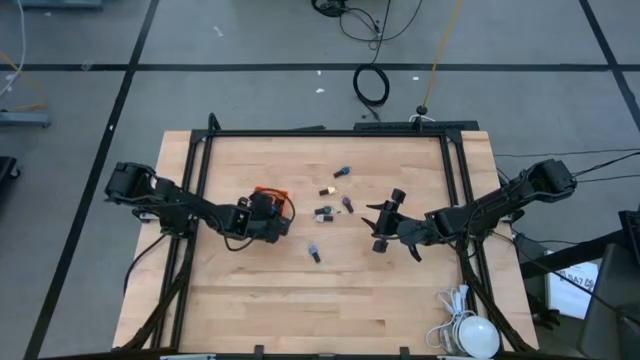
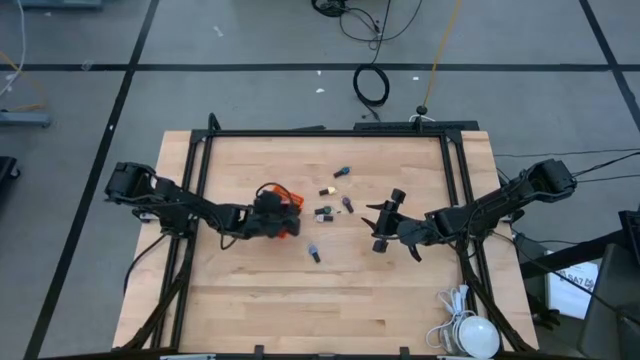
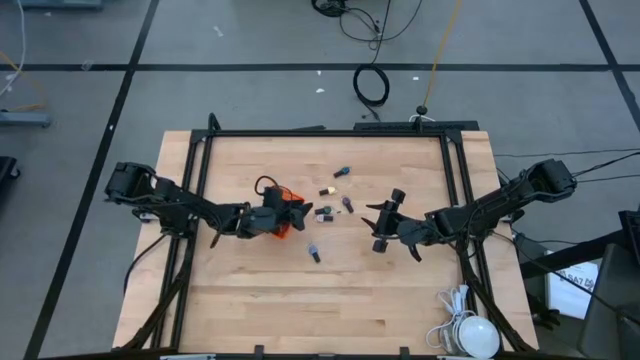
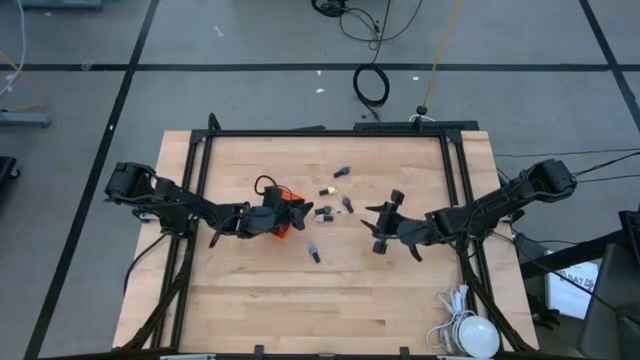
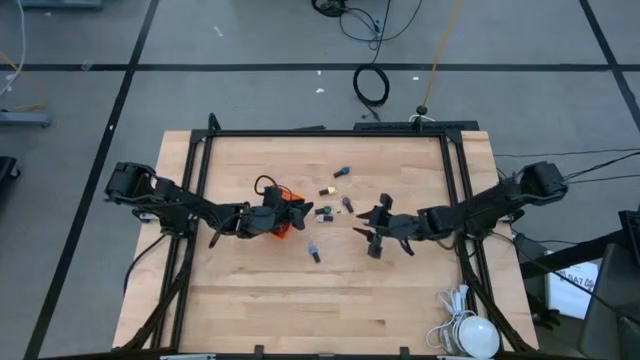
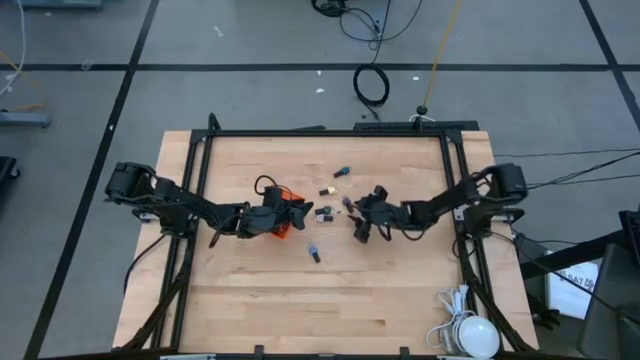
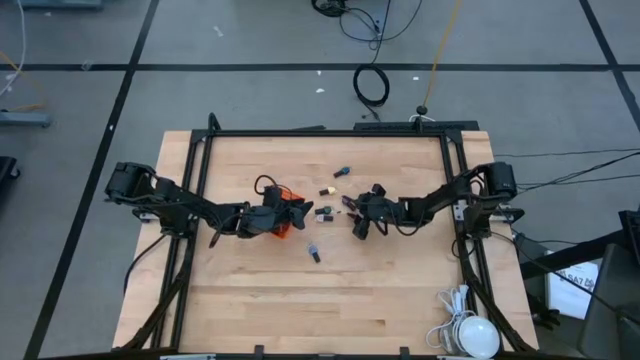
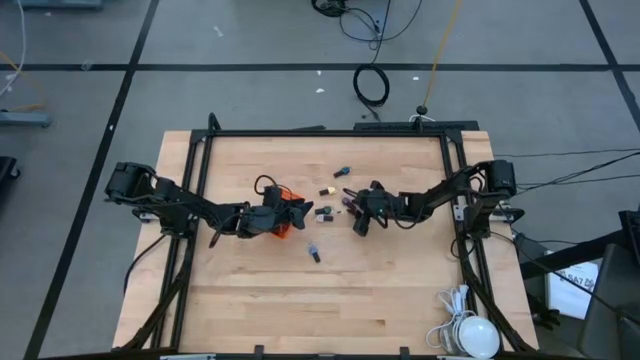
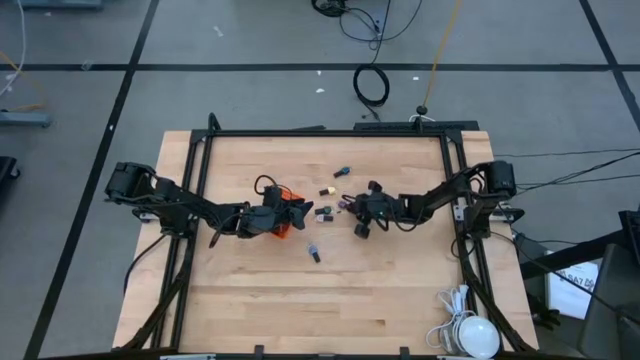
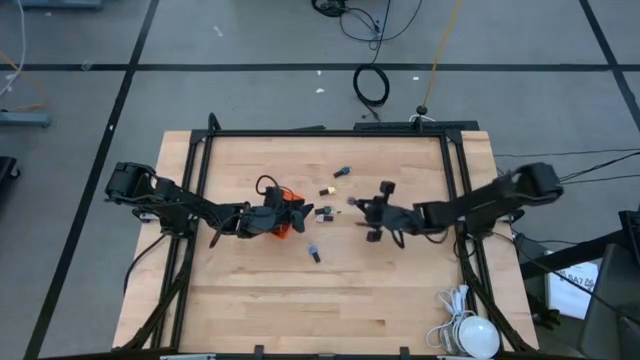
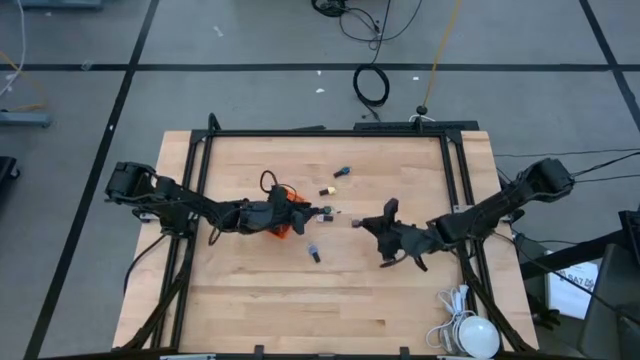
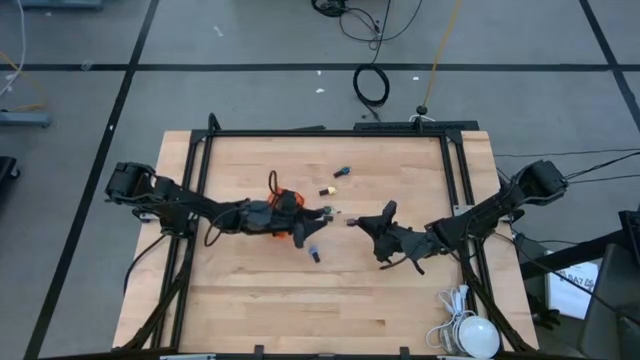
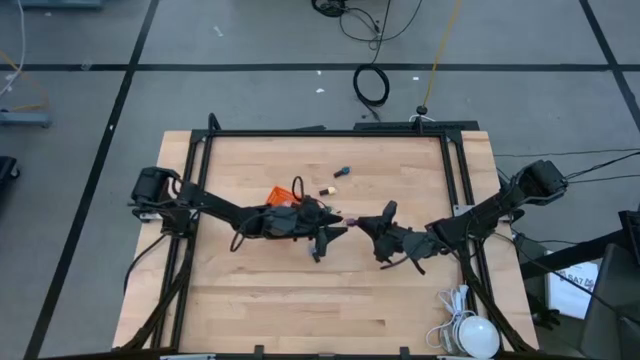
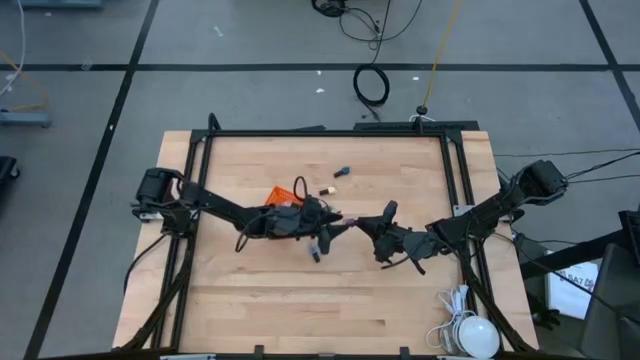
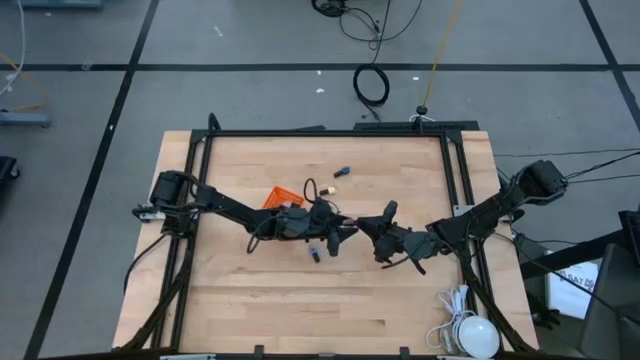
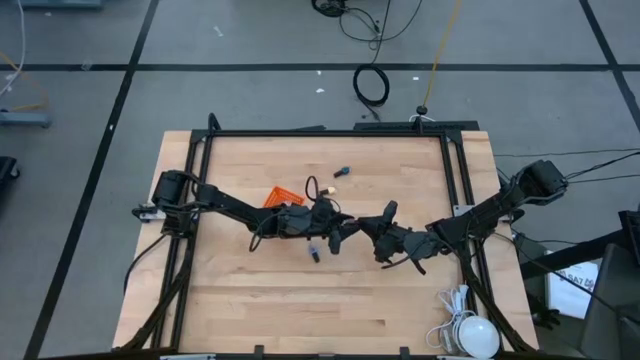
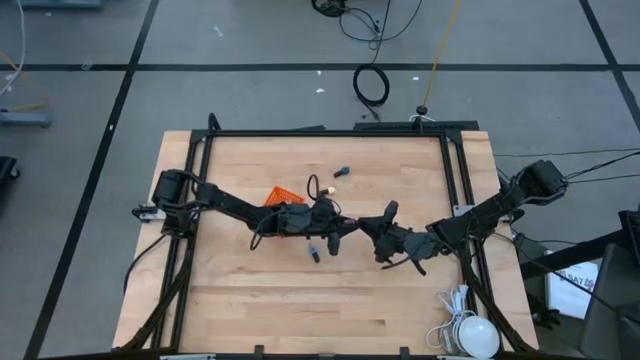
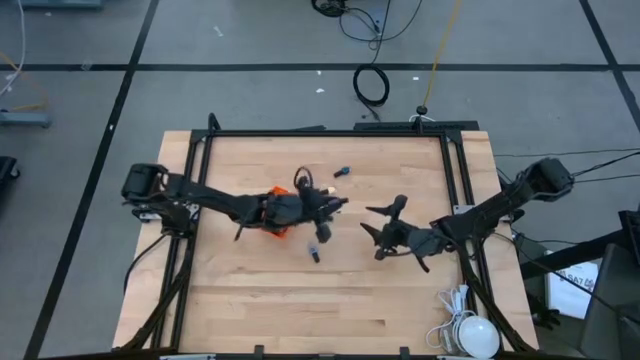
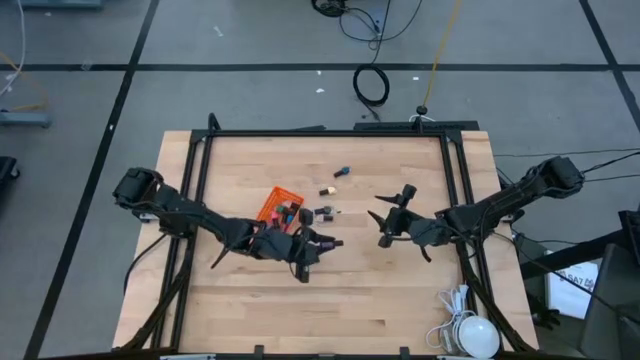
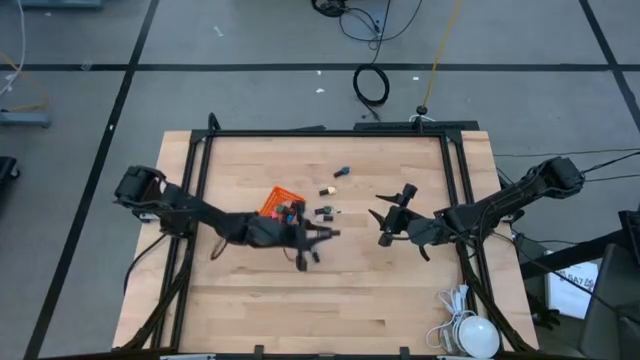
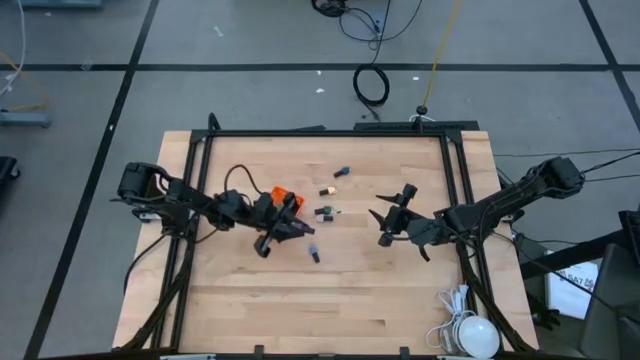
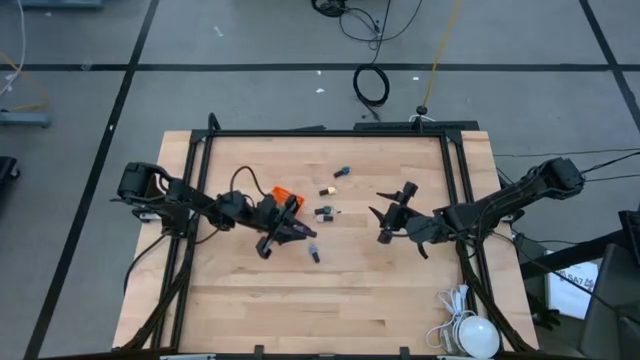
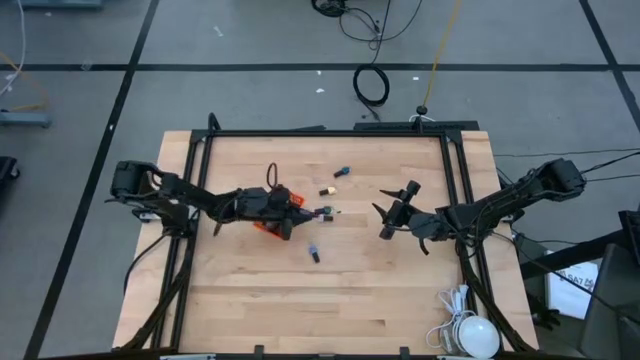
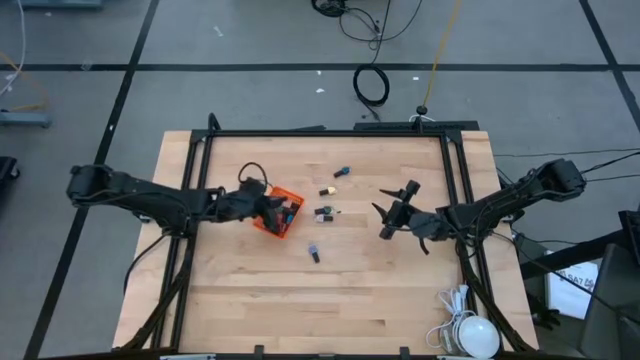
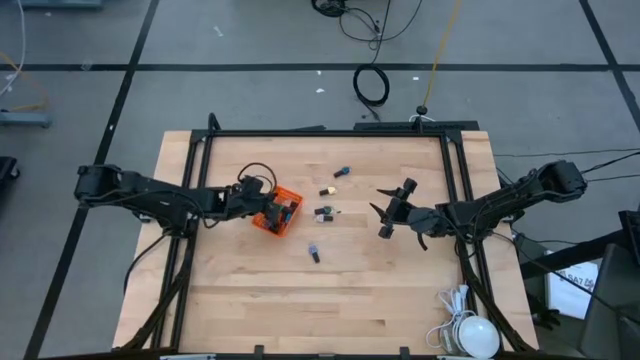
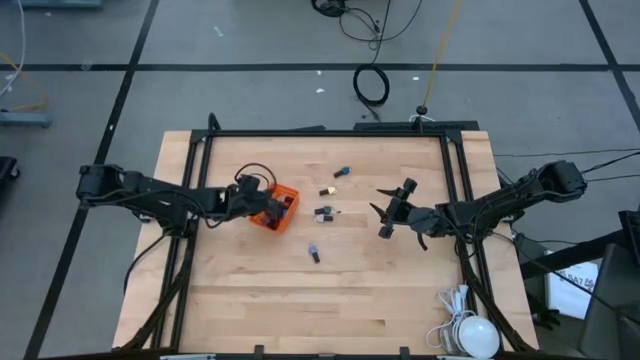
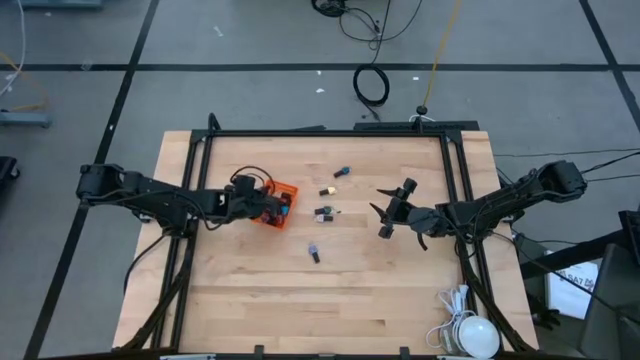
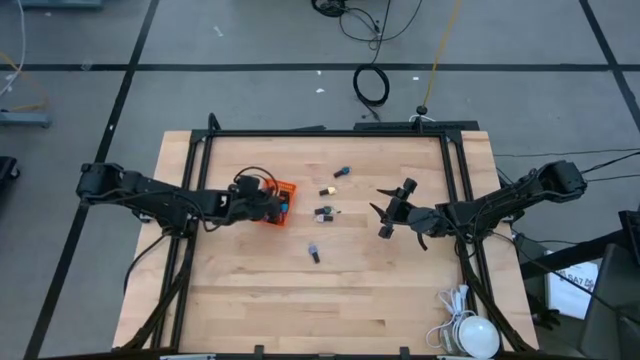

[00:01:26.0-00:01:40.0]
Task: Pick & Place Nail Polish
Put the violet nail polish into the orange basket

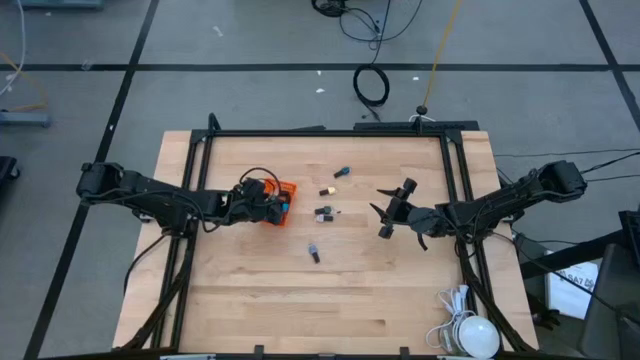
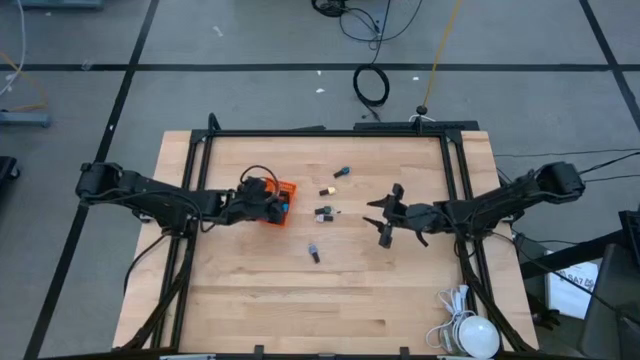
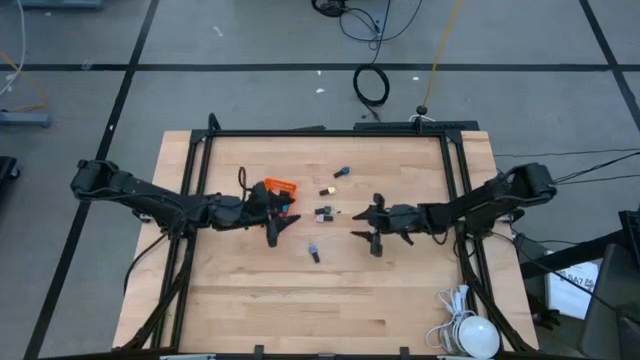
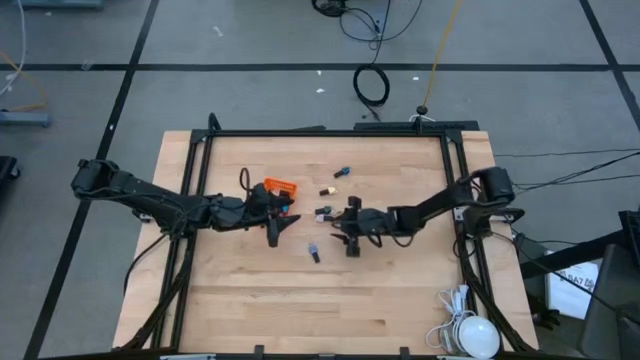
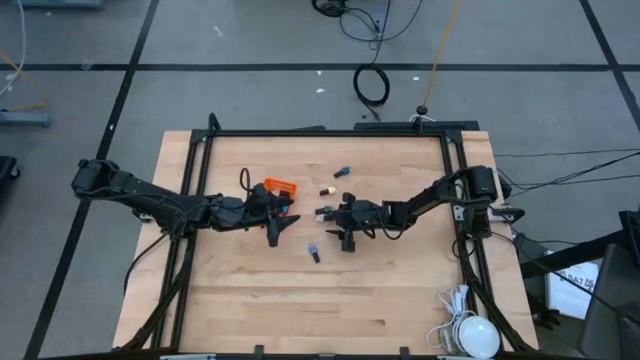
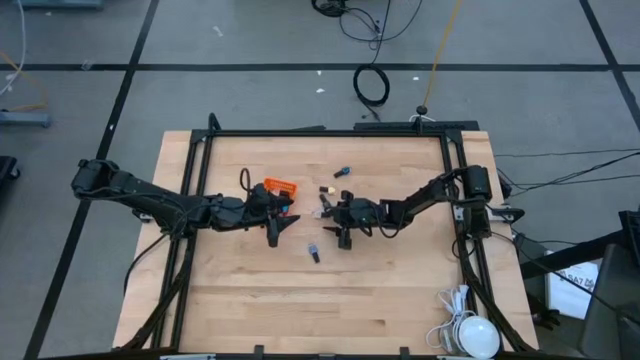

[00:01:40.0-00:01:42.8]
Put the brown nail polish into the orange basket

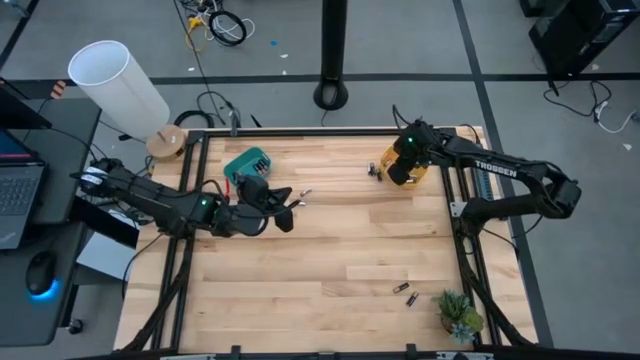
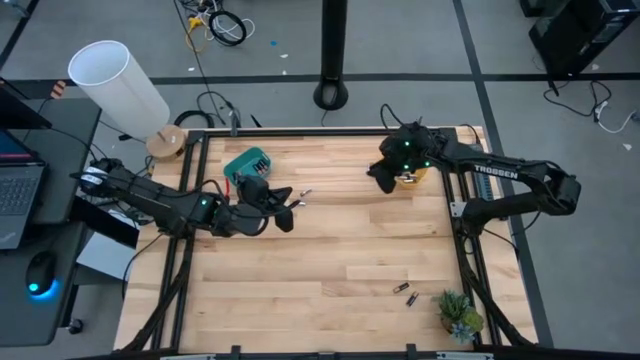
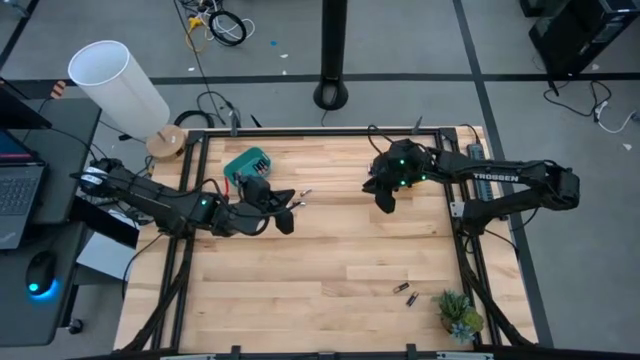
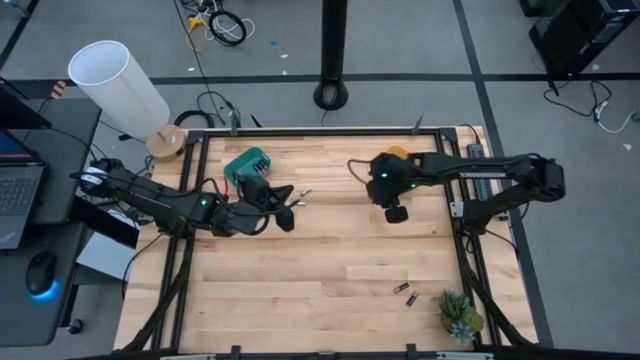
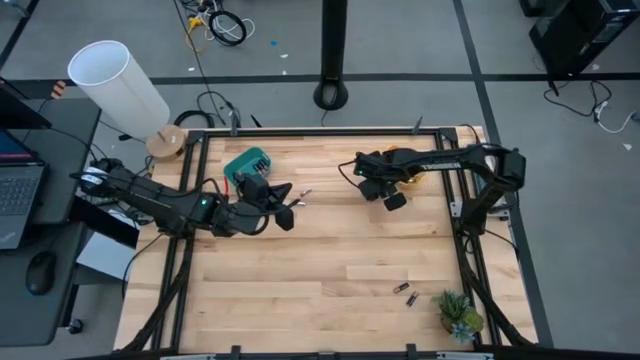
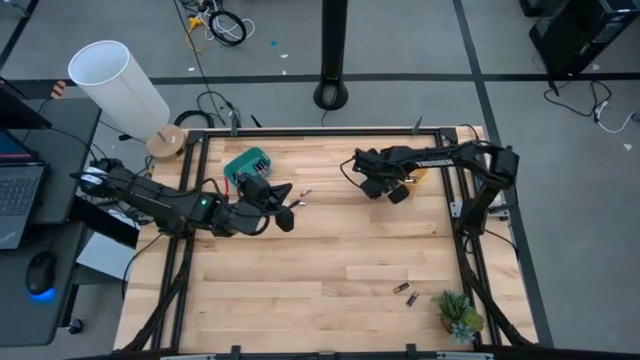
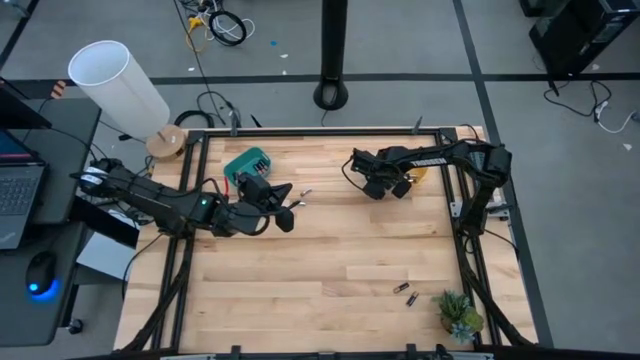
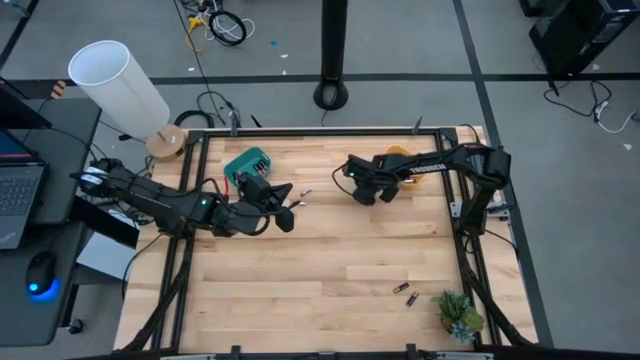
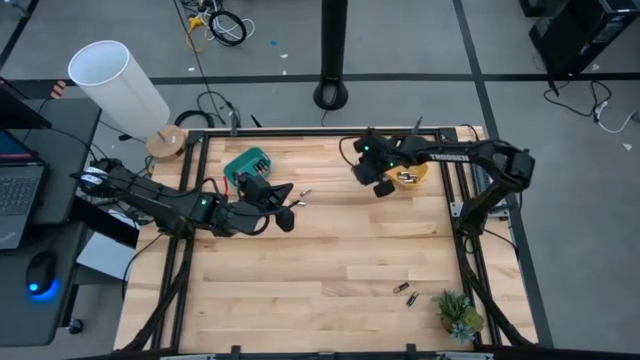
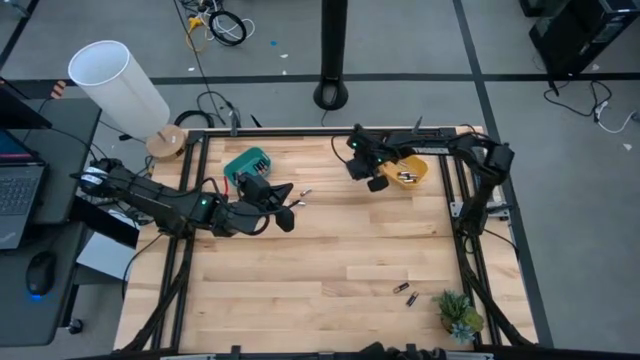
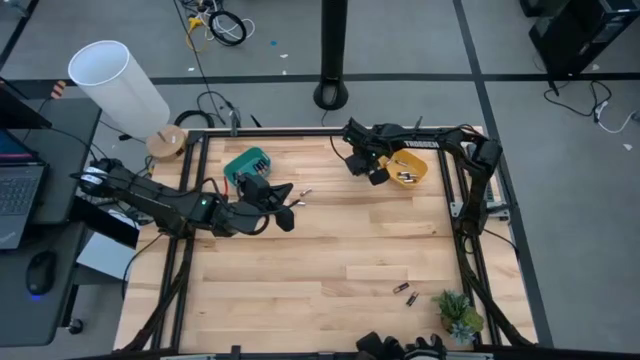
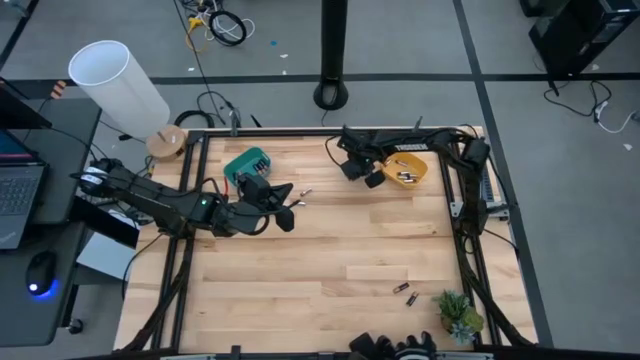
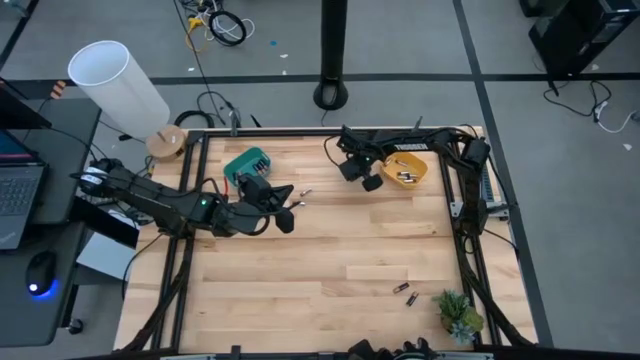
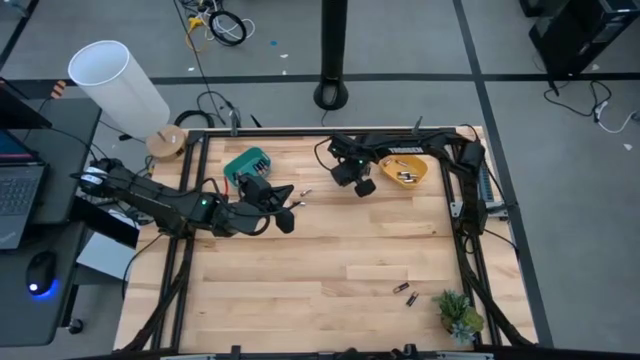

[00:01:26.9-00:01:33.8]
Task: Sort batteries
Put the silver battery into the yellow bin
